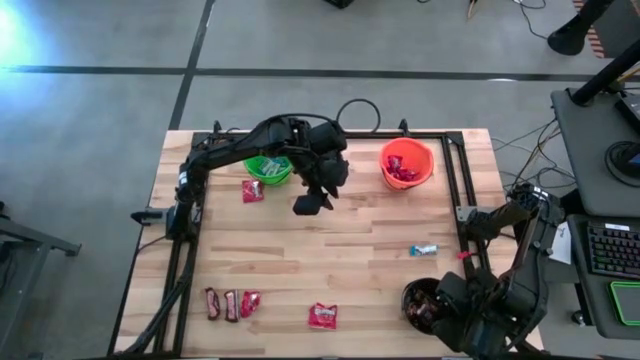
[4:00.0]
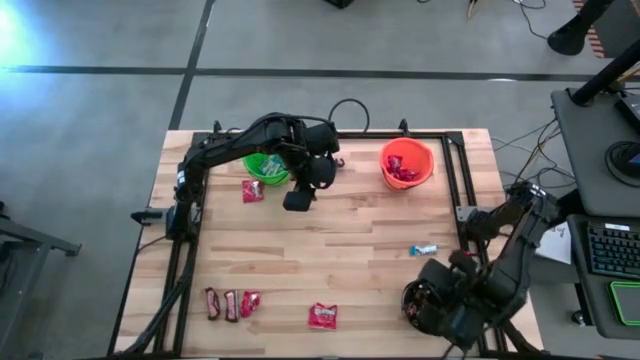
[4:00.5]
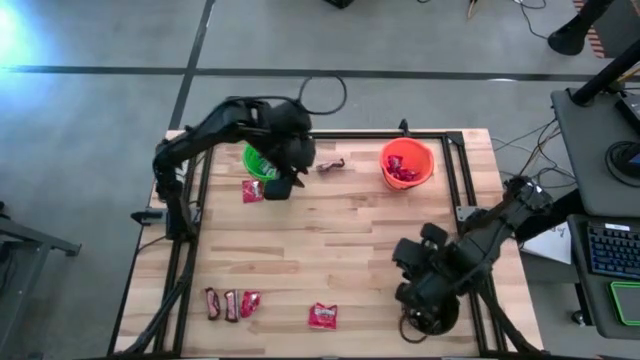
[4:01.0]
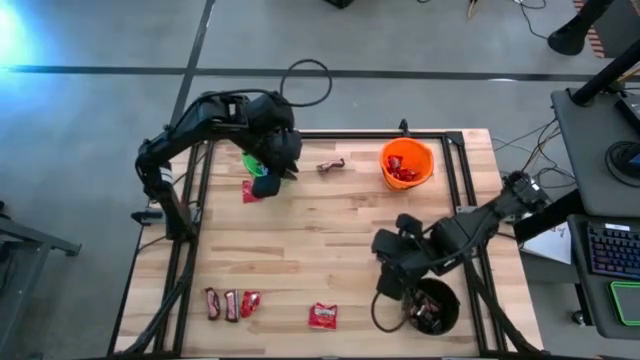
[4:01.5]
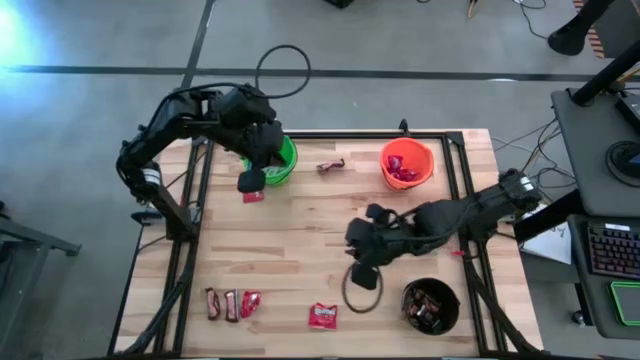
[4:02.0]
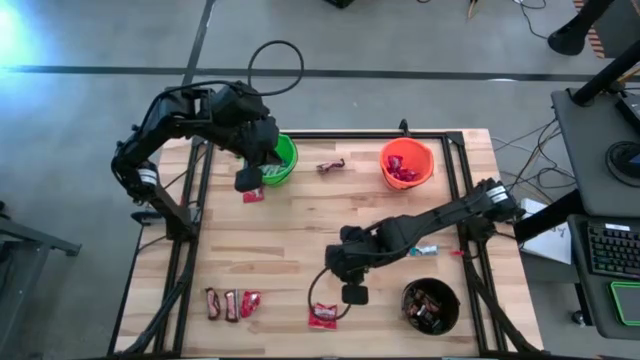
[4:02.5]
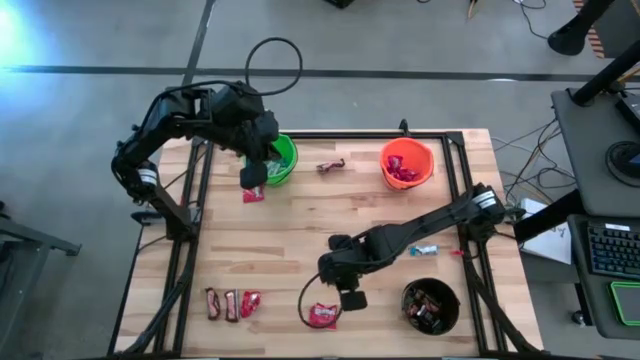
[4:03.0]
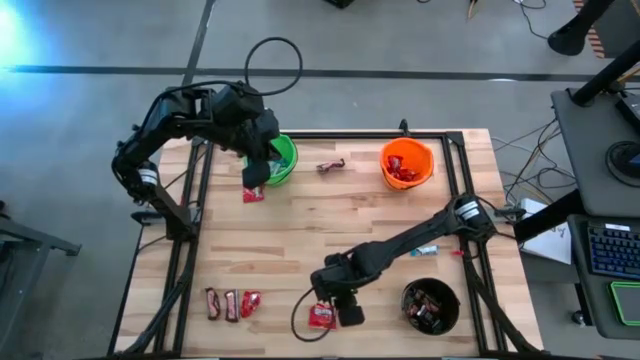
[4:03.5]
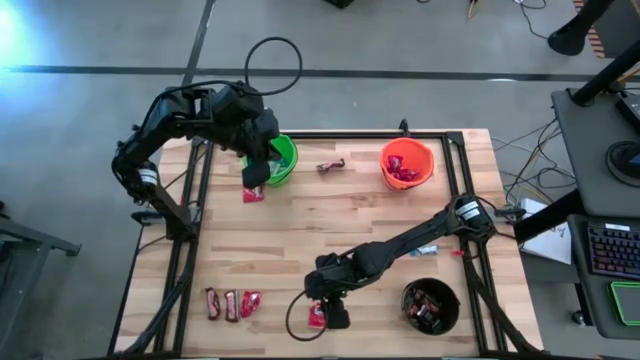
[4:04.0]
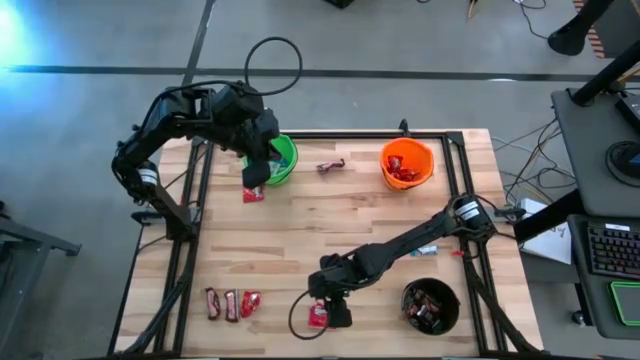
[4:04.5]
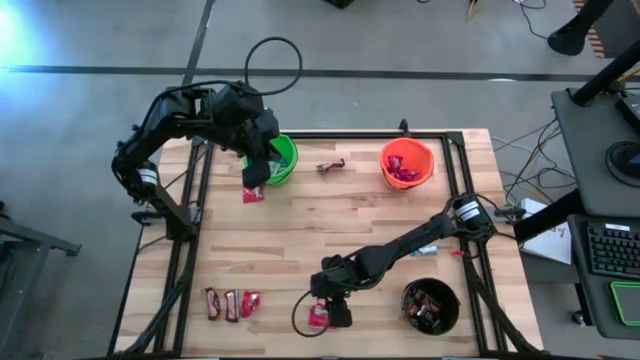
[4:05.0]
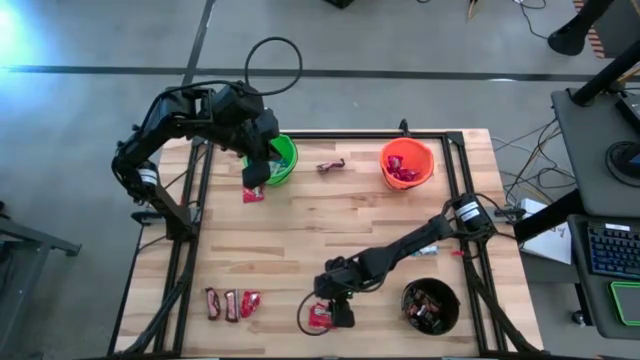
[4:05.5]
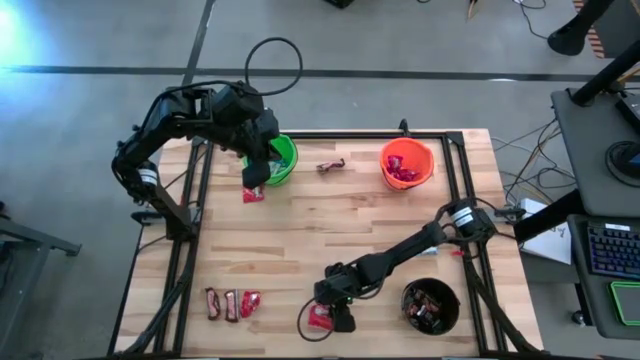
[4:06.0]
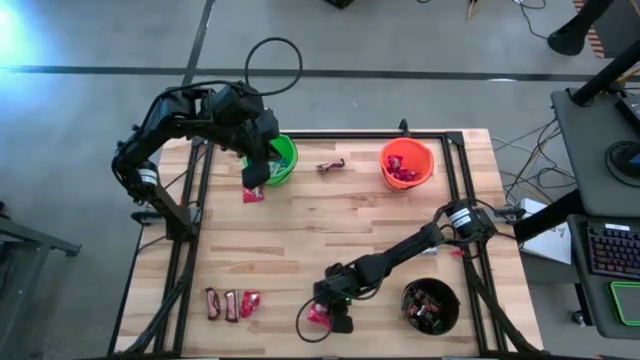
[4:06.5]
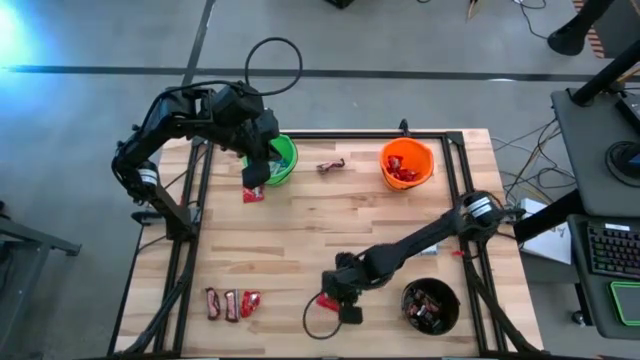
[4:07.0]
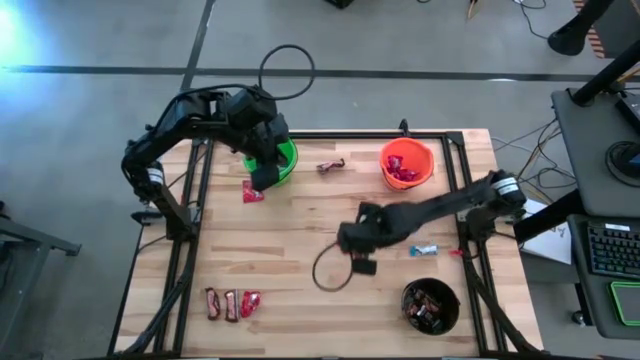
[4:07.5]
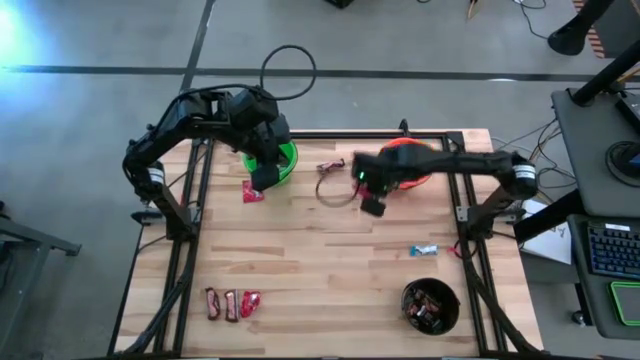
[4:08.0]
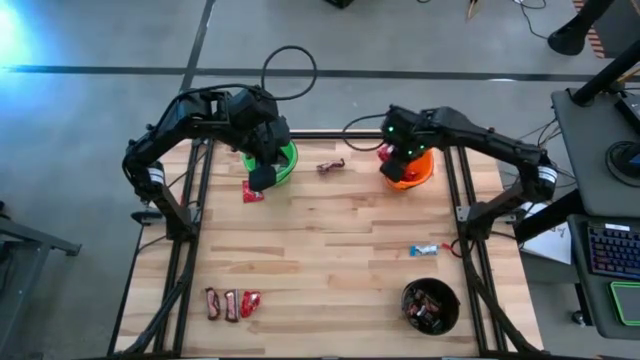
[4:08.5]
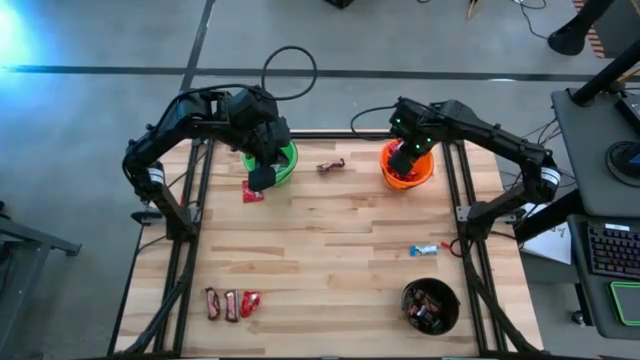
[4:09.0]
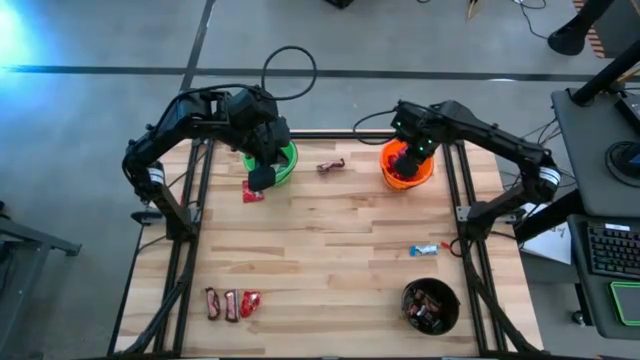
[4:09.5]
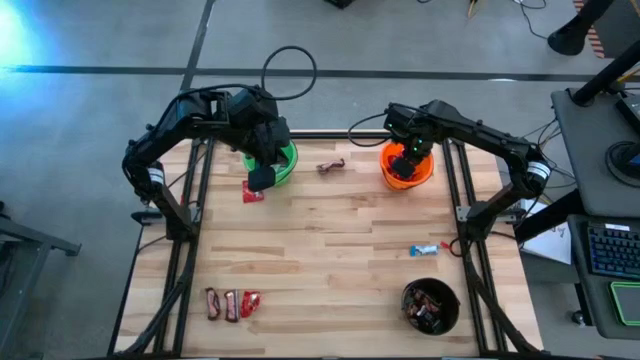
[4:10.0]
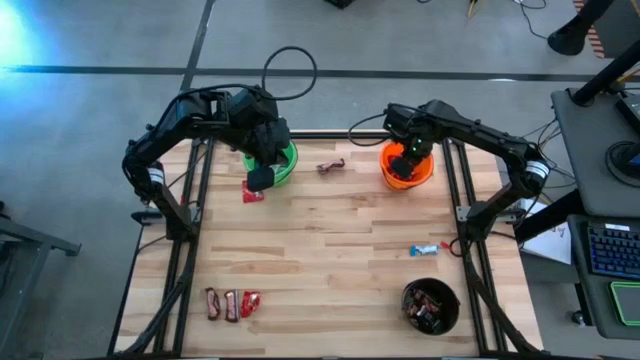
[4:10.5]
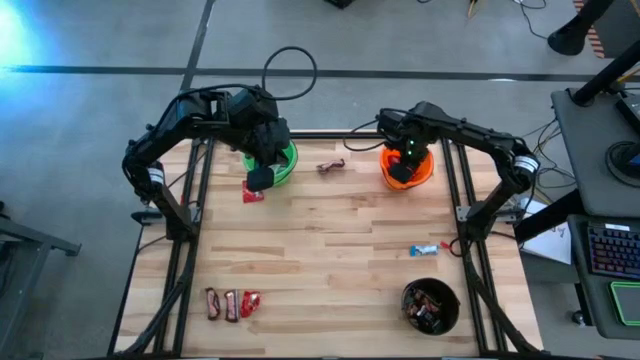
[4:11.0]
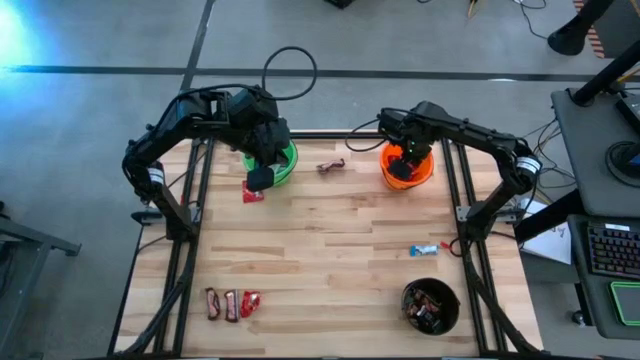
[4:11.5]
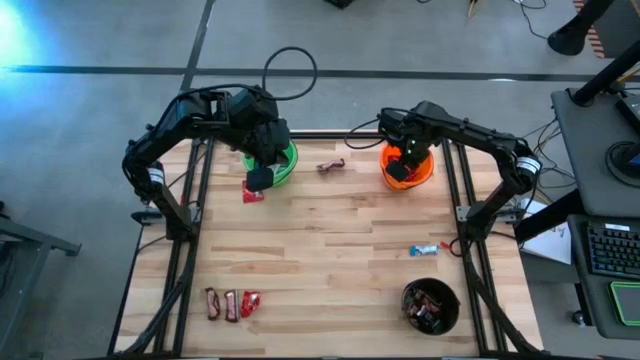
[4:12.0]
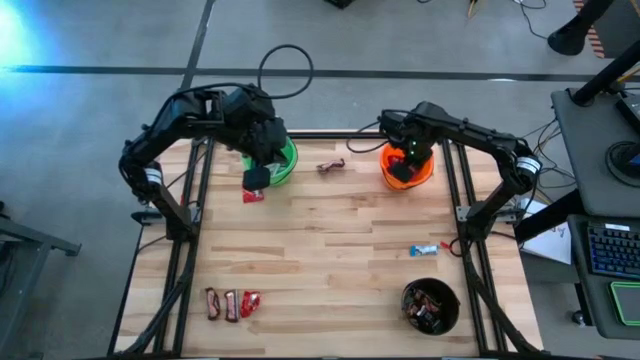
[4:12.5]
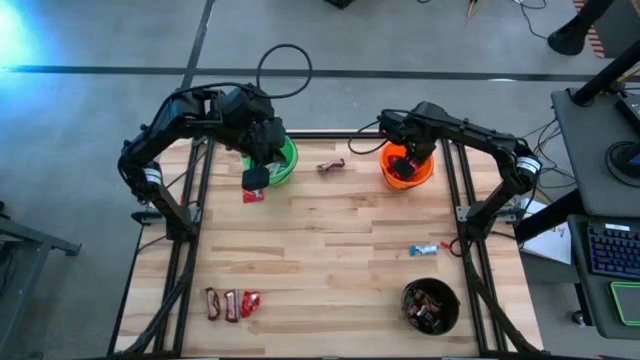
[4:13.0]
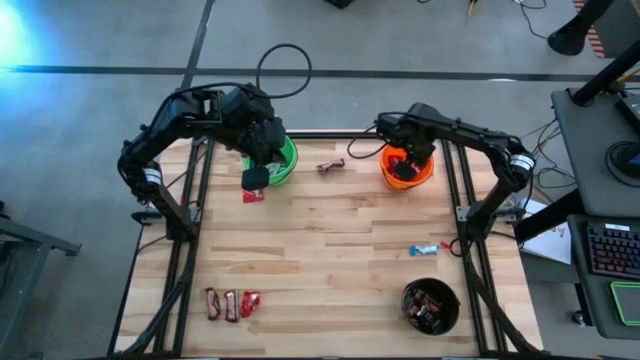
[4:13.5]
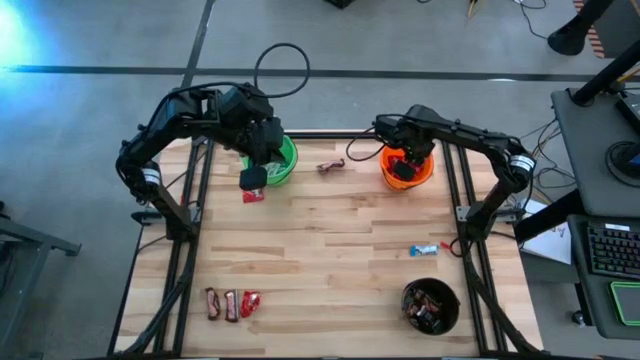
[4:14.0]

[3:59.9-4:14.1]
Task: Sort candy
Put the red candy into the orange bucket

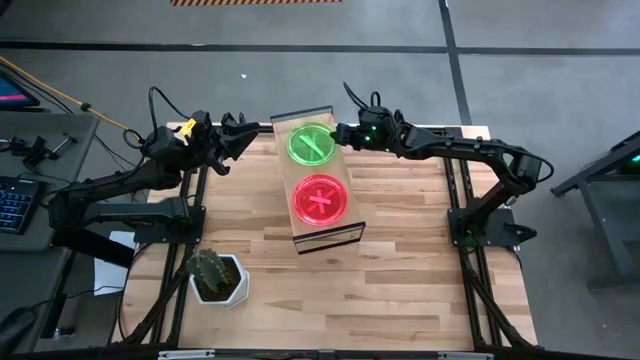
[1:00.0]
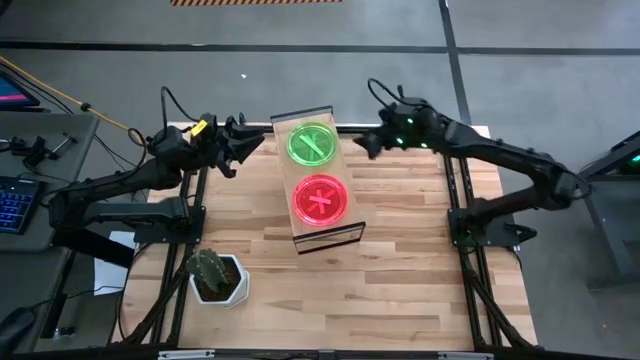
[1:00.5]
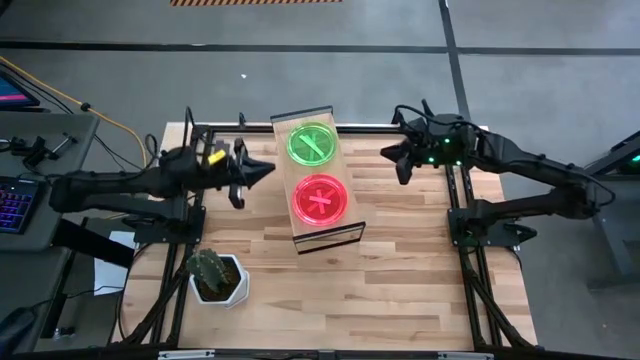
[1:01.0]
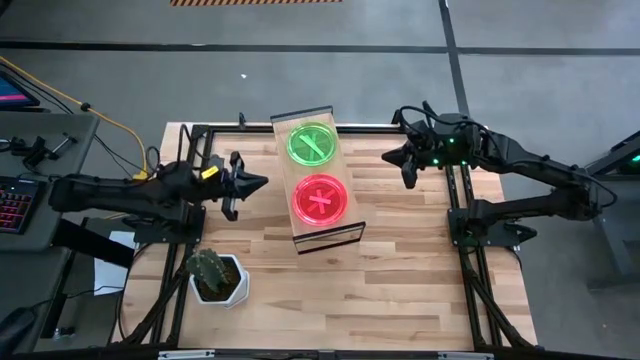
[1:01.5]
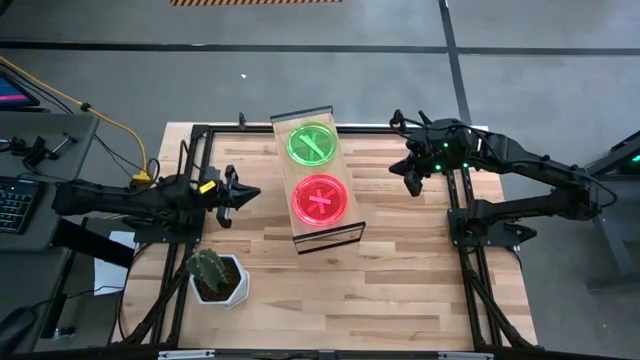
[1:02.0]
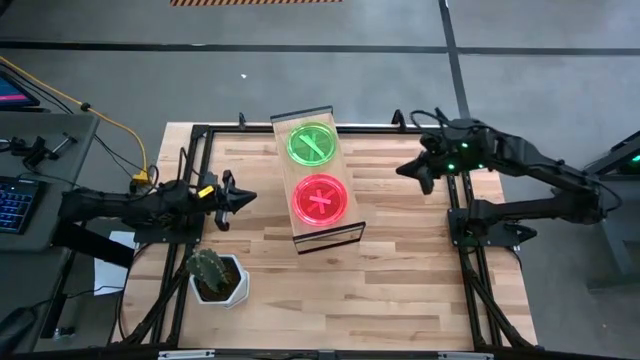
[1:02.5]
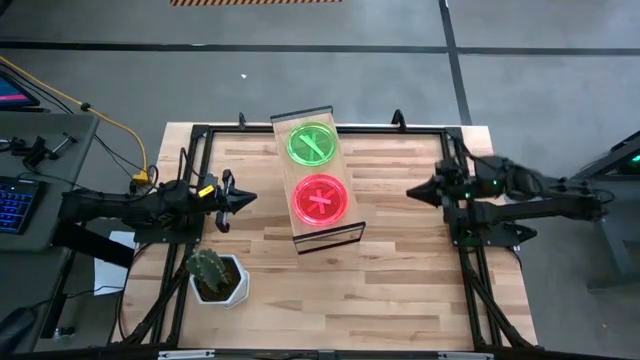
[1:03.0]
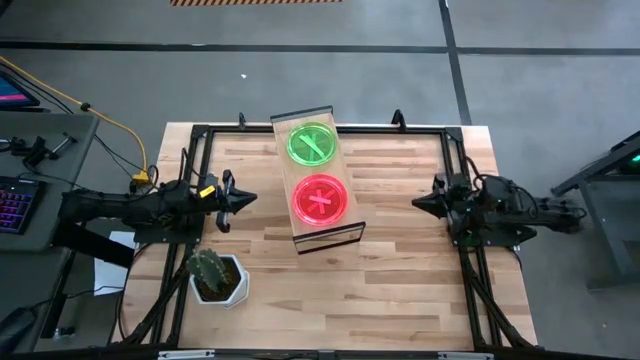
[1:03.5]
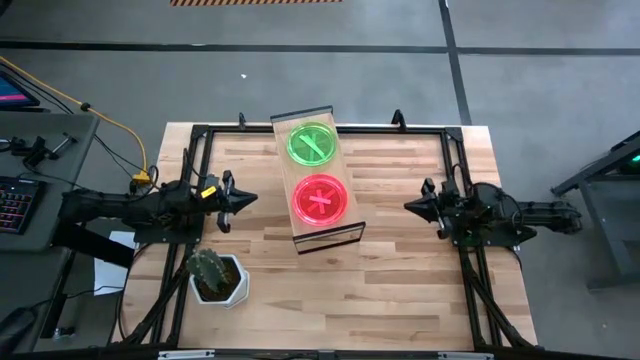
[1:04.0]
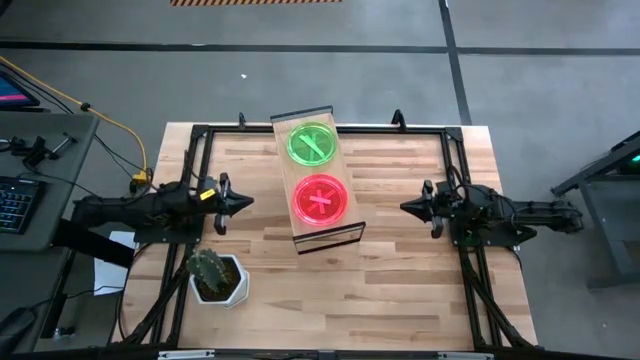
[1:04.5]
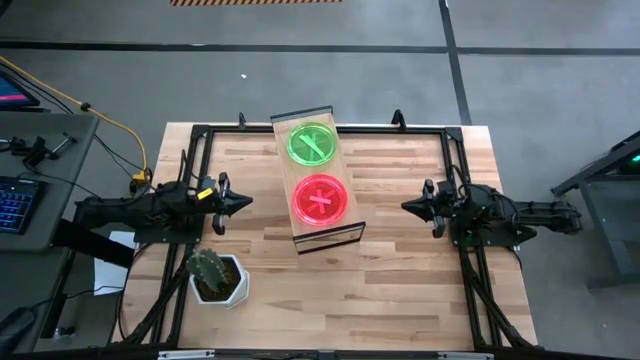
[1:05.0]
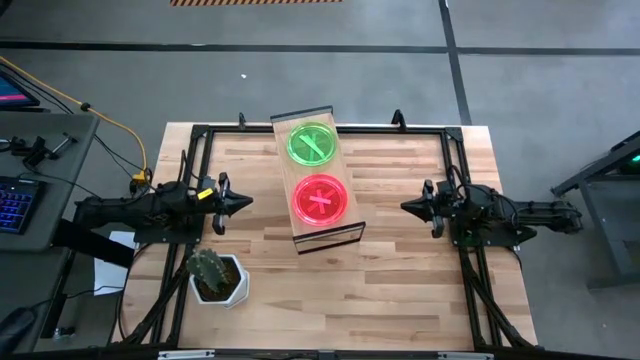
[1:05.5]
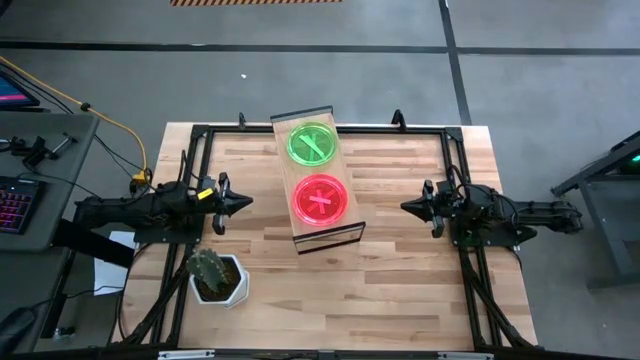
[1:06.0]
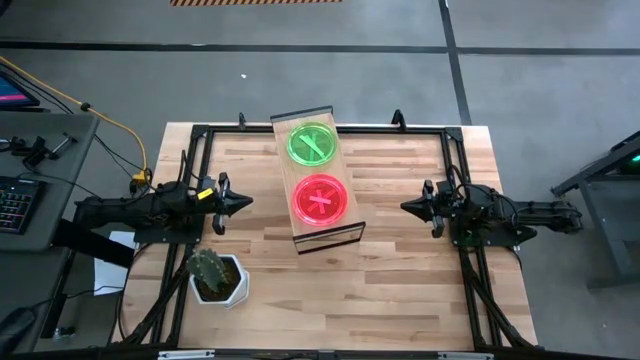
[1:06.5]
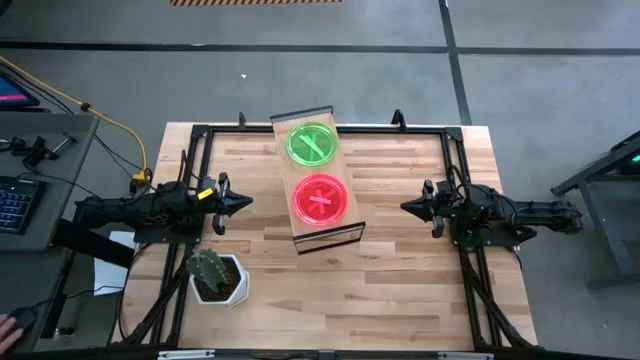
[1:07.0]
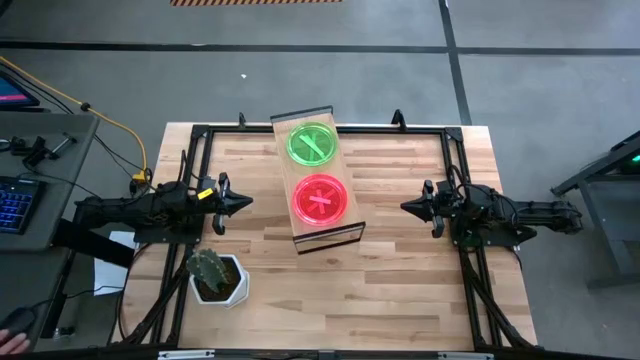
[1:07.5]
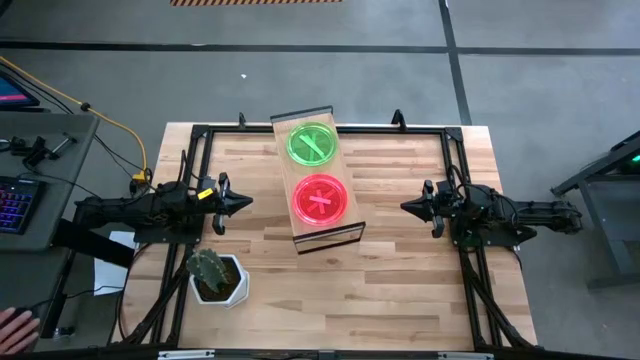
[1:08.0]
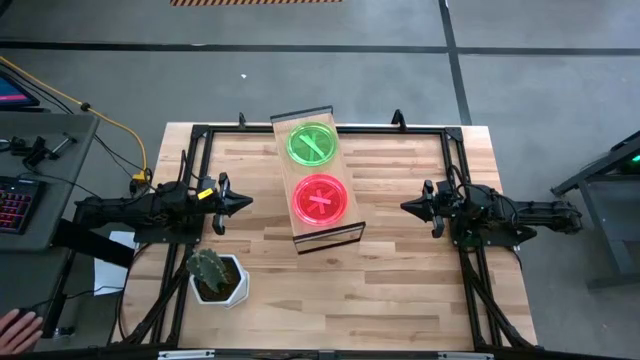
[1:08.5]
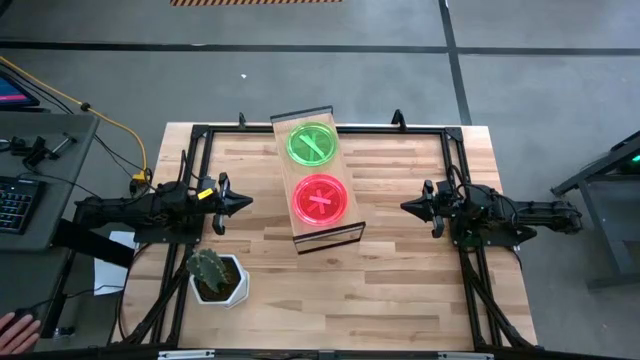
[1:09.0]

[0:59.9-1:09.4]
Task: Place and stack plates onto a shelf
Return to Home Position
